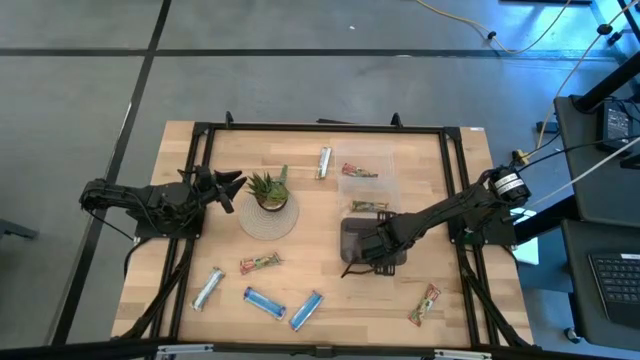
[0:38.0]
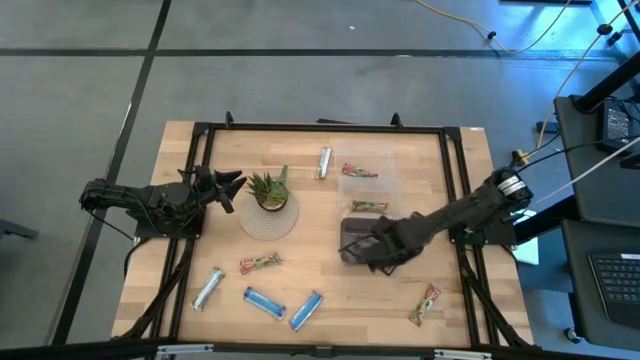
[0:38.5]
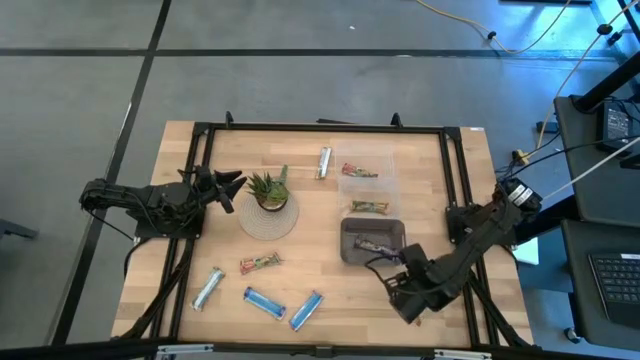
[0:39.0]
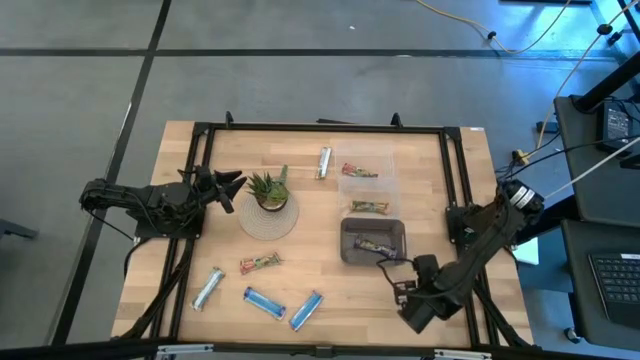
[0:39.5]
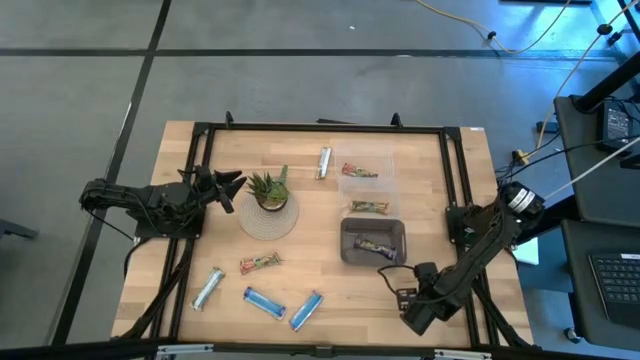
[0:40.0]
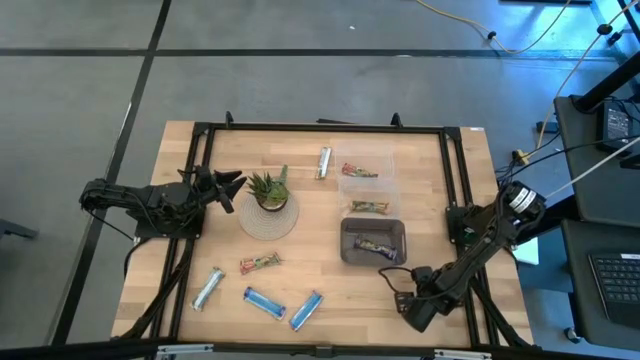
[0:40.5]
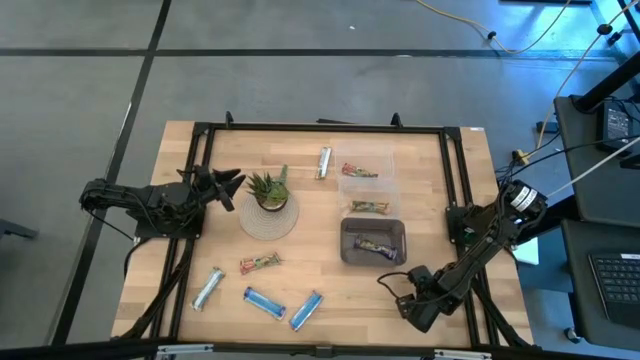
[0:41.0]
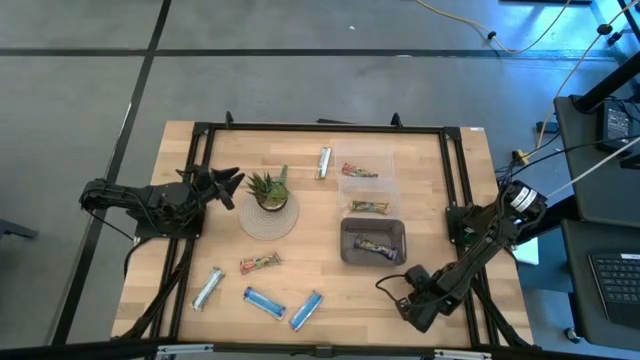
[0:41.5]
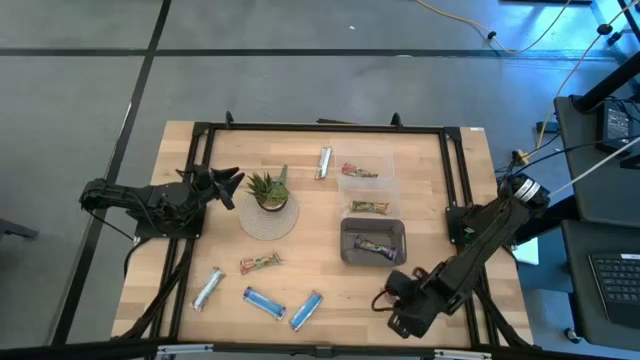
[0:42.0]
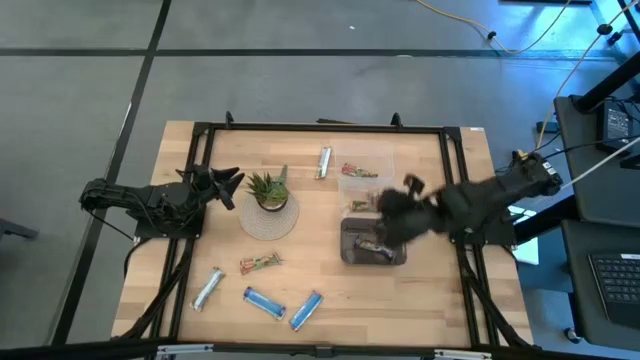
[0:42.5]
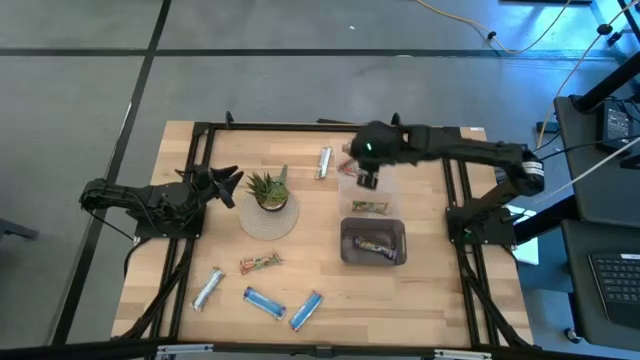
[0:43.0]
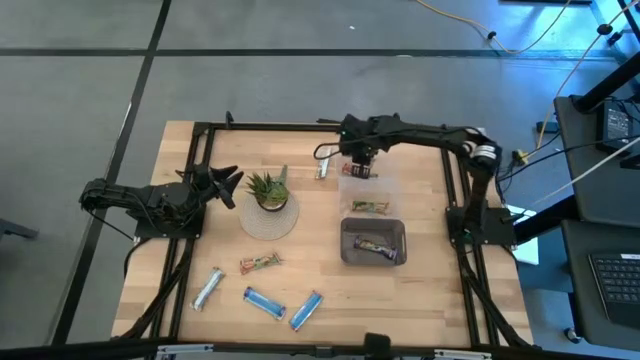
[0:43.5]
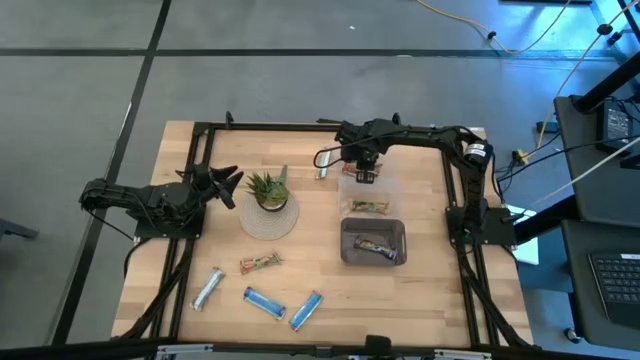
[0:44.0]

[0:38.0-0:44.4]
Task: Pick and place Granola Bars by type
Put the bottom red granola bar into the top transparent bin

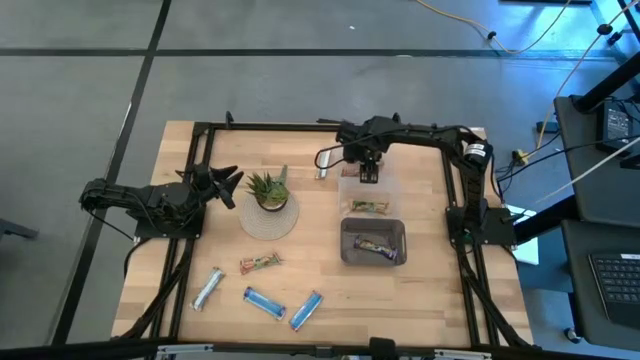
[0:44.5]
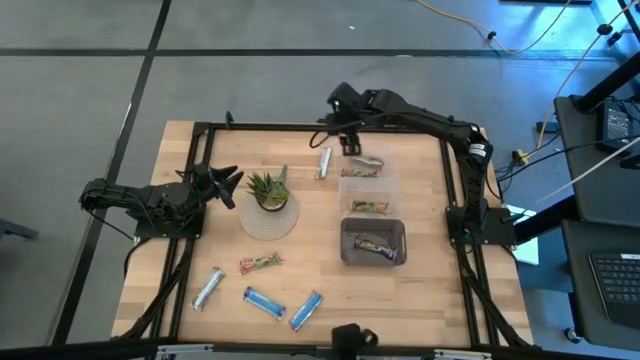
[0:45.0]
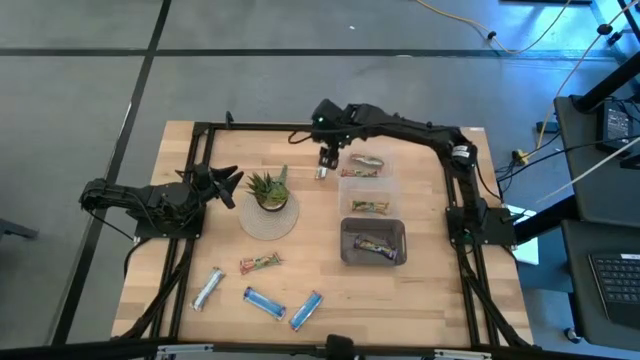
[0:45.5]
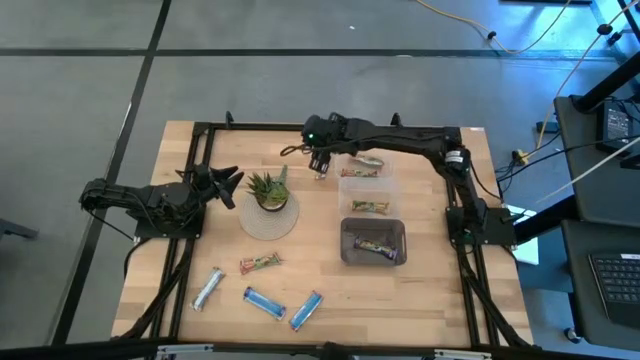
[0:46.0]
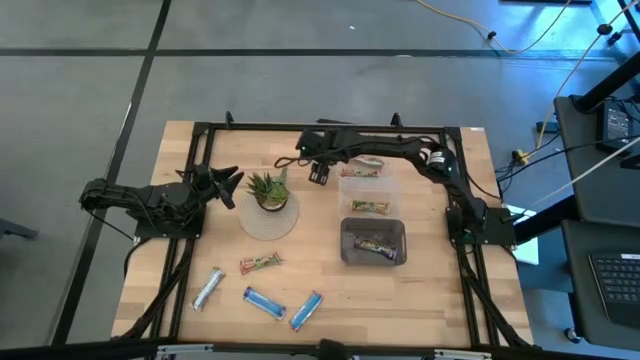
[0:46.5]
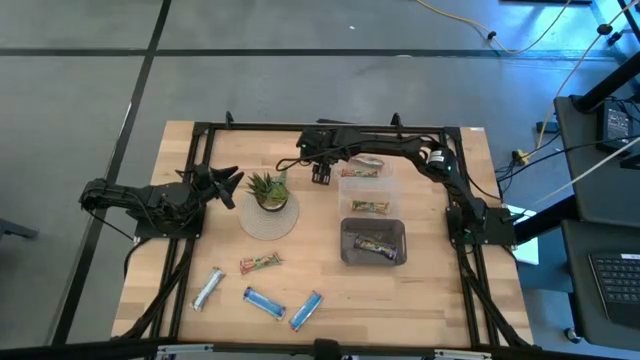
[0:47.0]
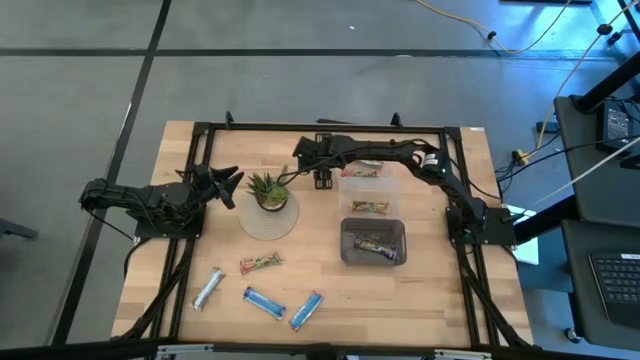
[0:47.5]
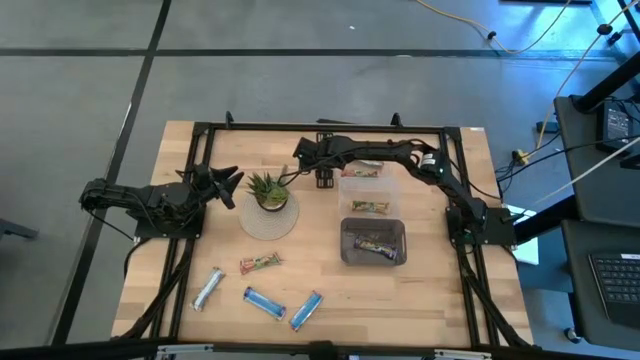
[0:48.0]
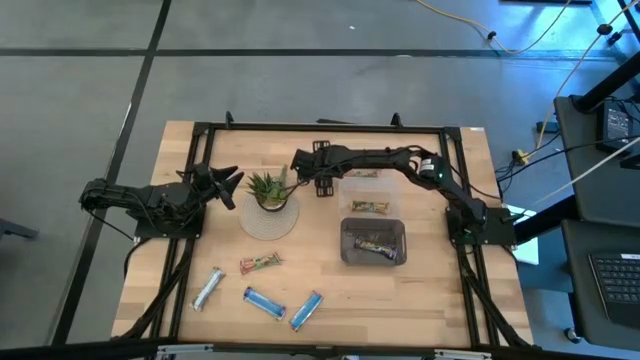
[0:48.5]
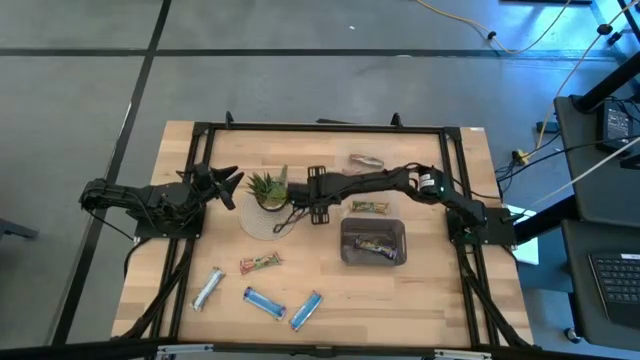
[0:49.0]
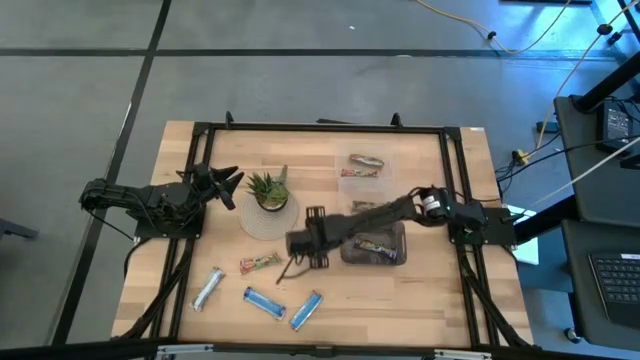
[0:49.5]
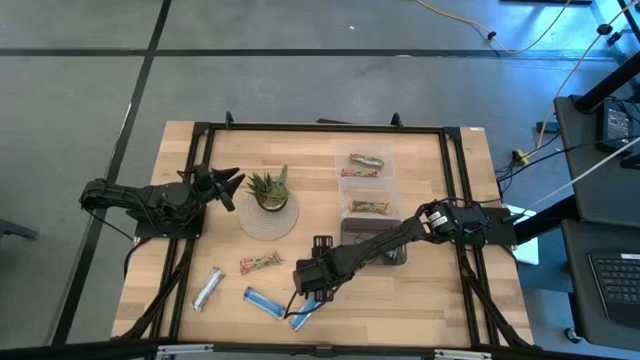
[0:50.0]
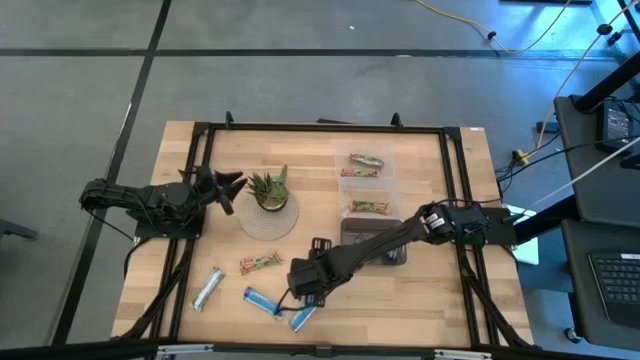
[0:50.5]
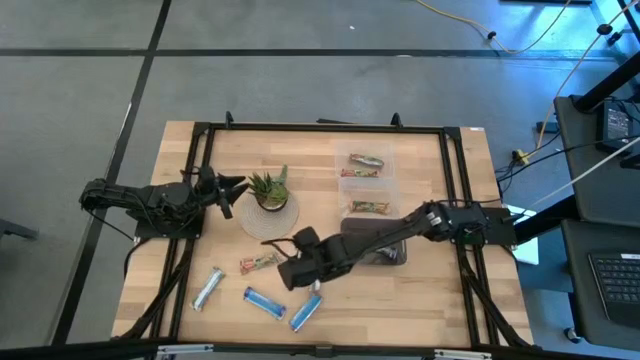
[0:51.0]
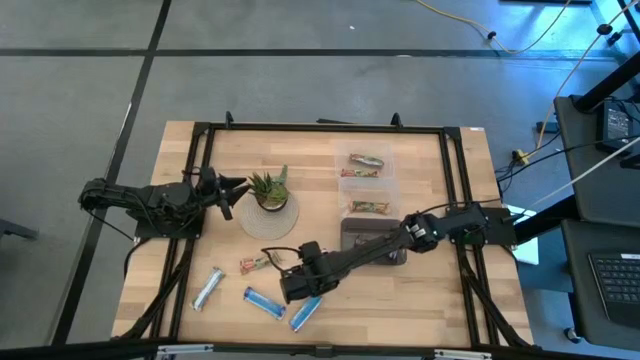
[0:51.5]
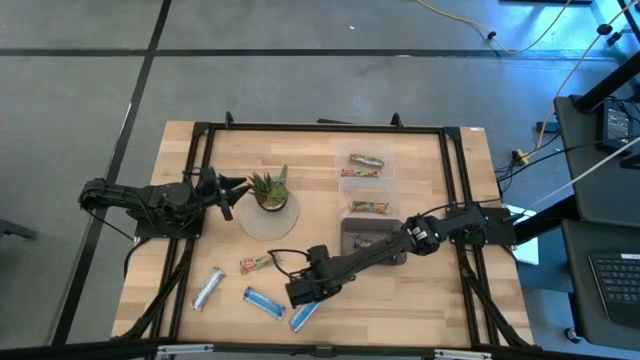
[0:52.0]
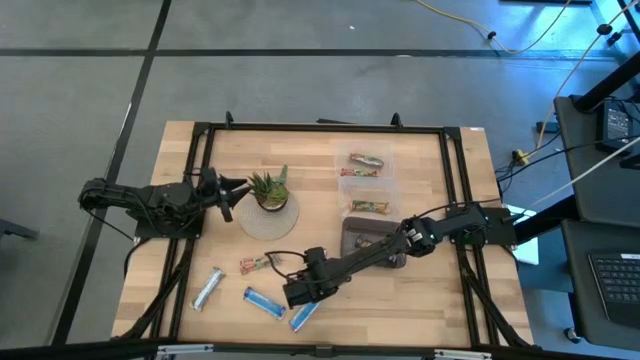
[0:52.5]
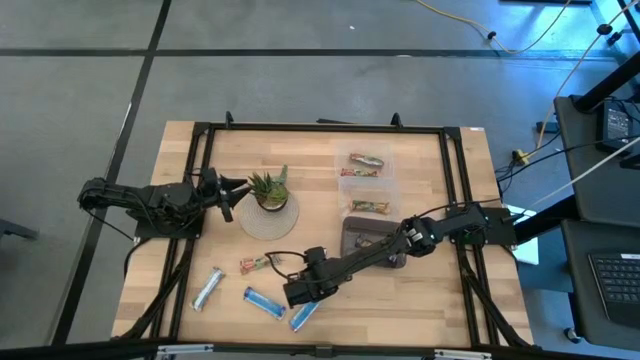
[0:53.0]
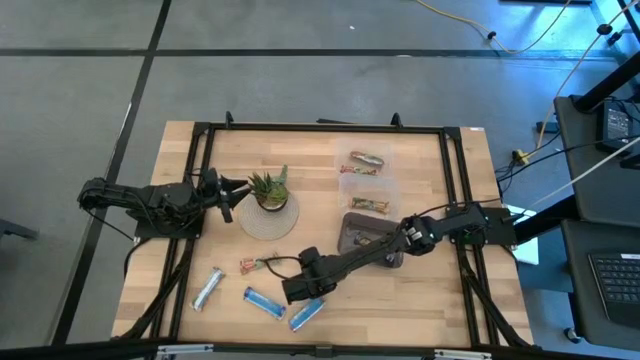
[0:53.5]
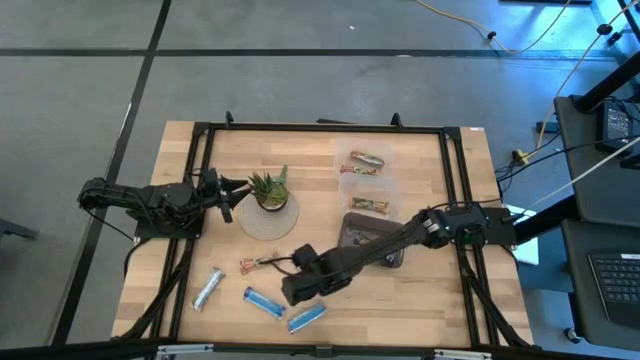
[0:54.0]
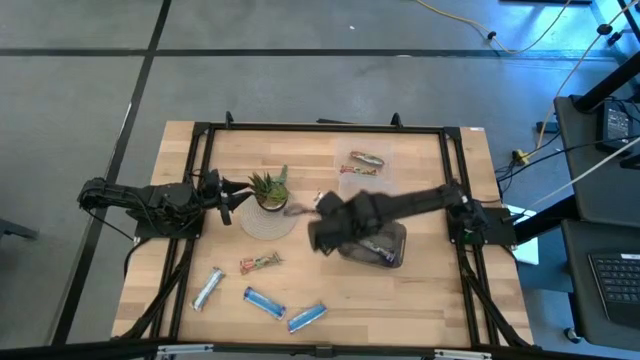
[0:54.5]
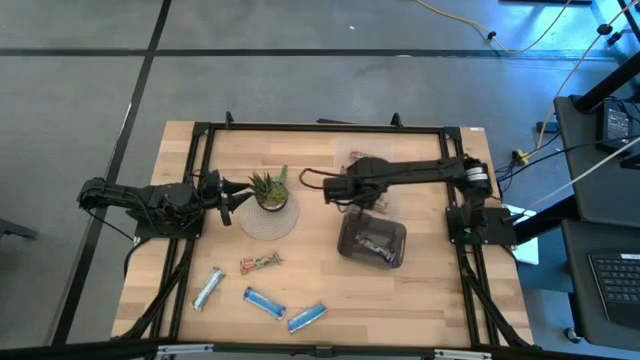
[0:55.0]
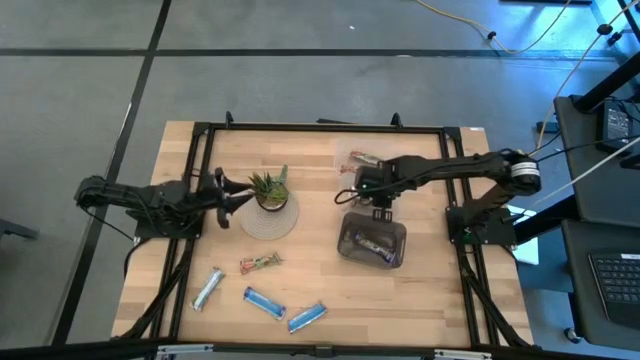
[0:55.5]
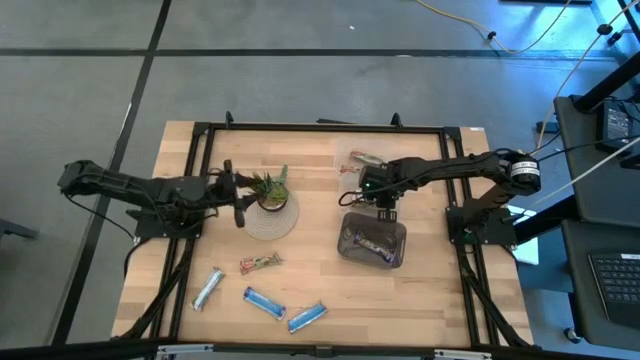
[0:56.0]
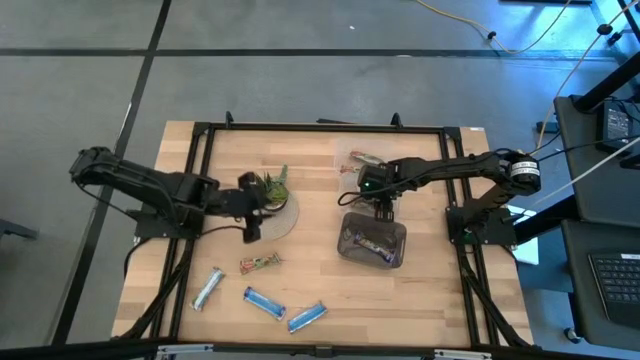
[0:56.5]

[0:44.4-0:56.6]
Put the top yellow granola bar into the bottom transparent bin
